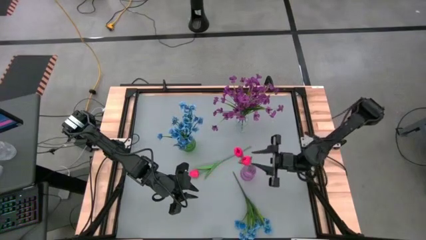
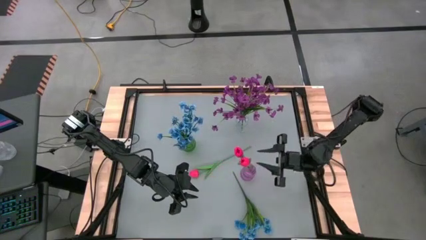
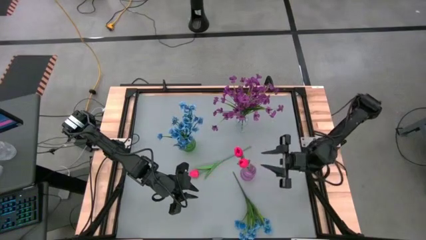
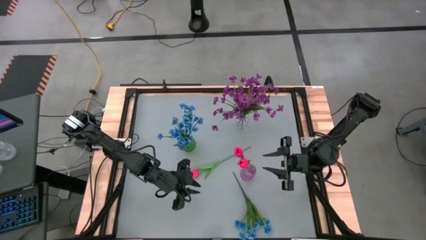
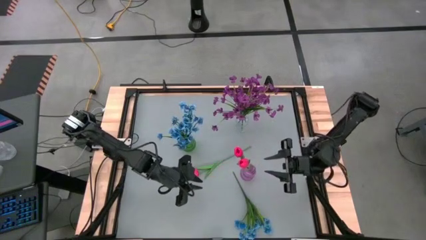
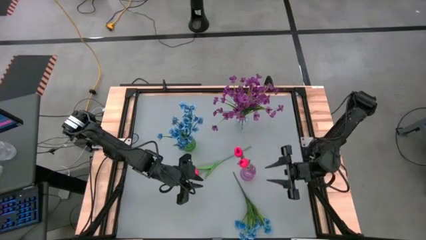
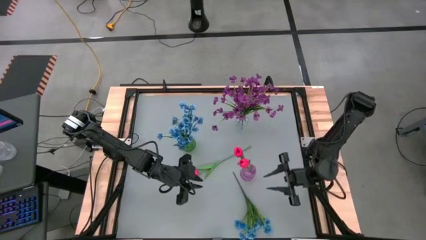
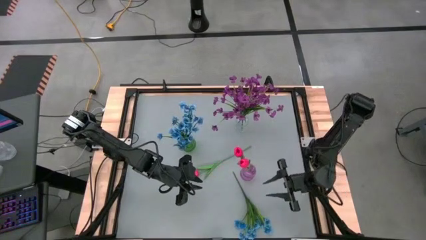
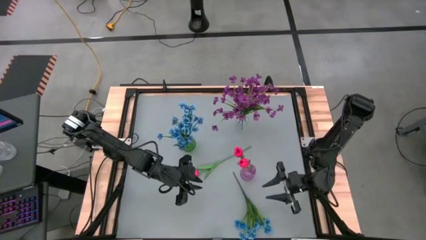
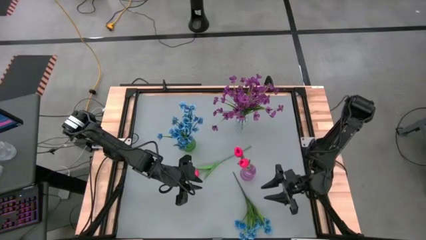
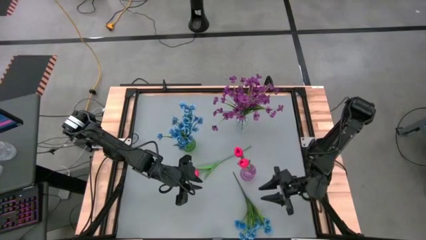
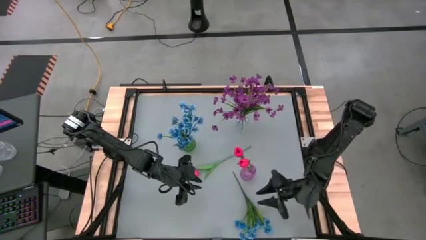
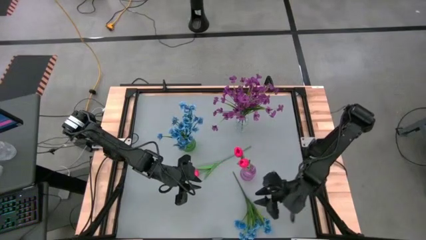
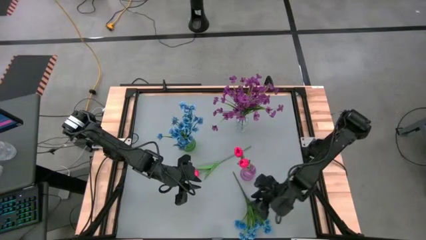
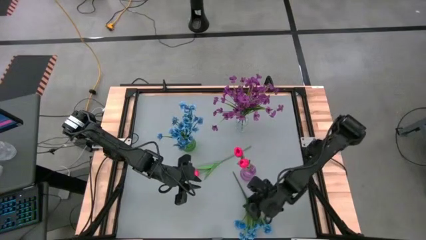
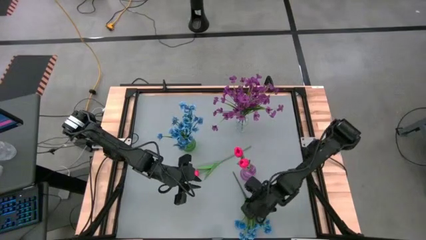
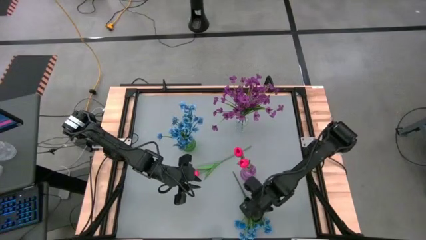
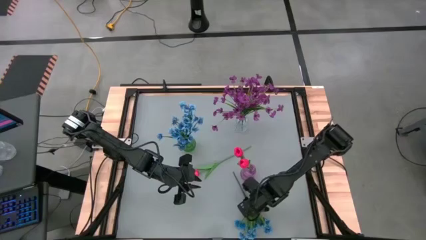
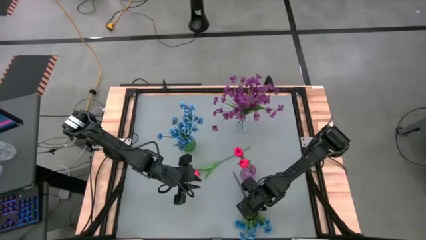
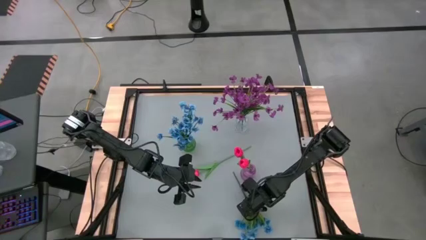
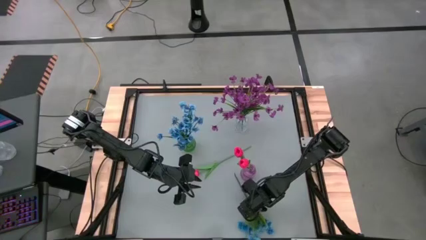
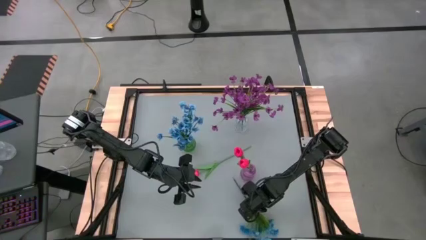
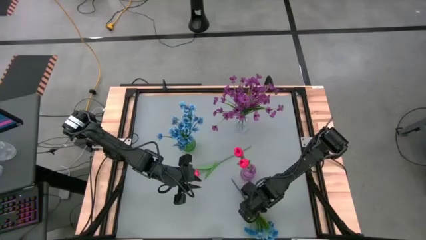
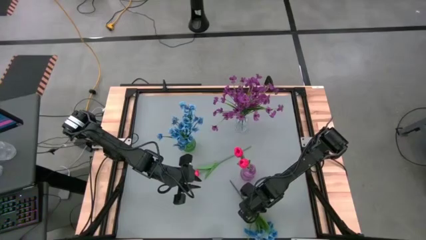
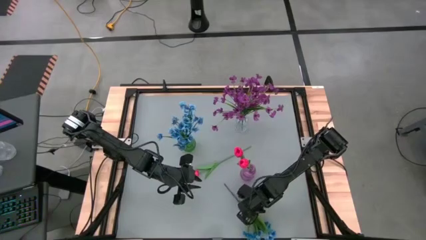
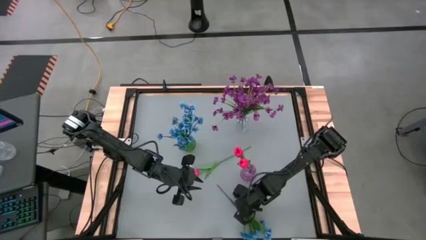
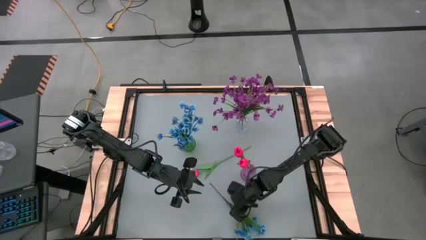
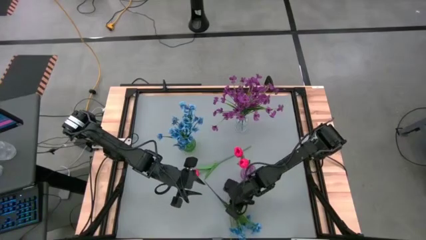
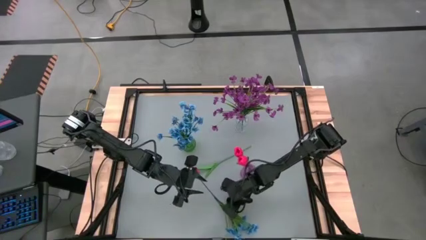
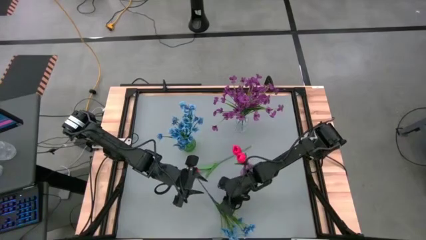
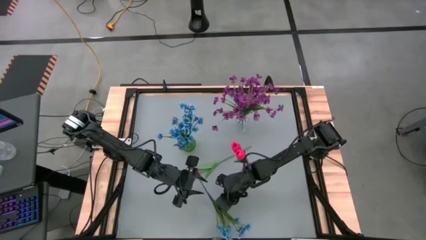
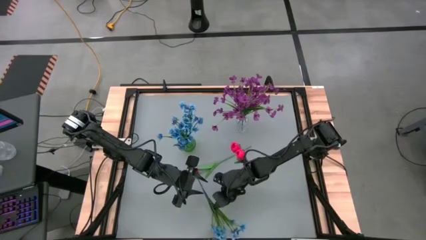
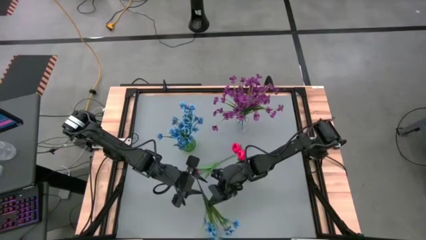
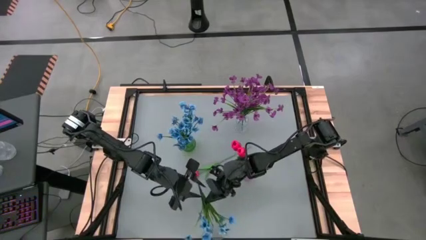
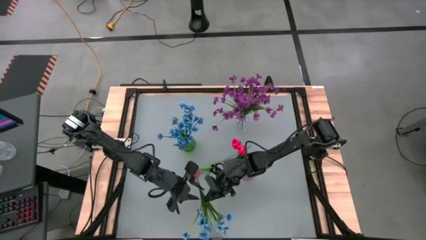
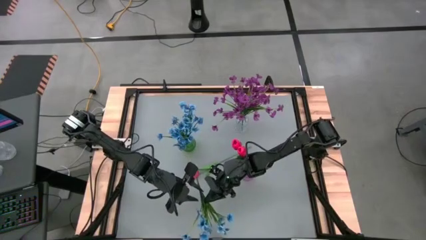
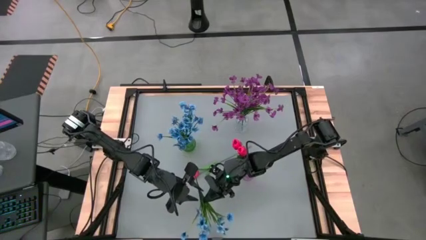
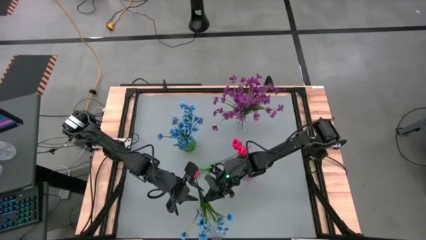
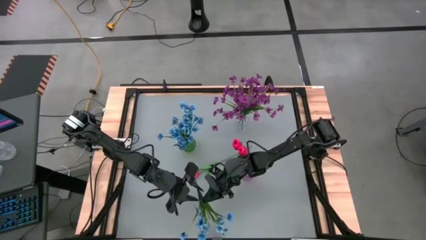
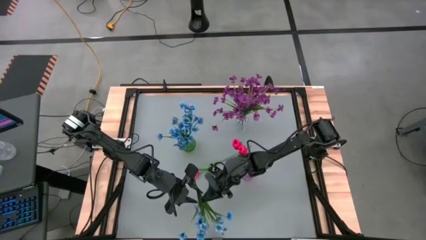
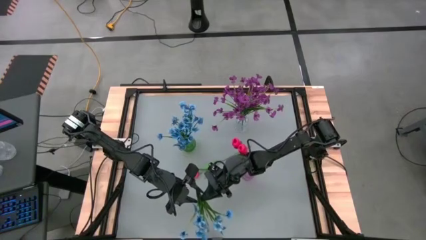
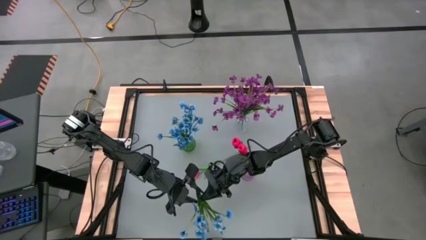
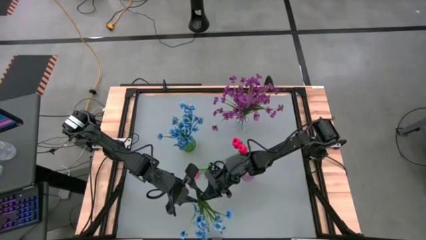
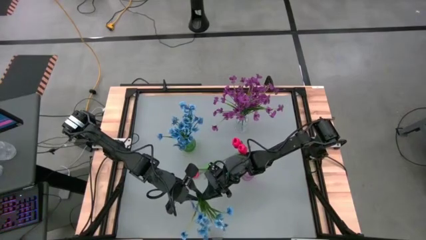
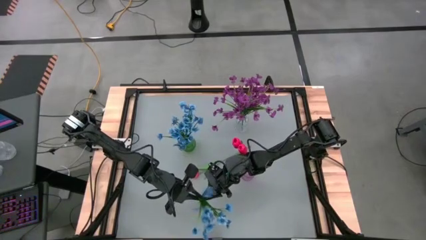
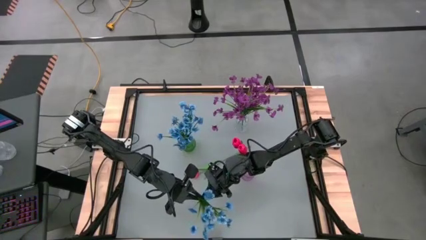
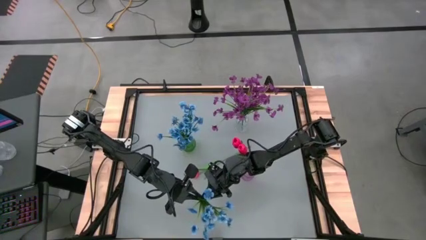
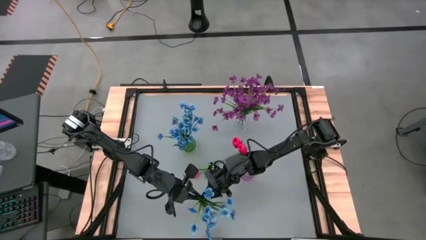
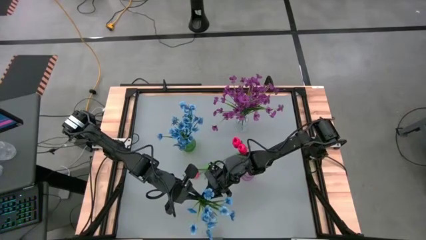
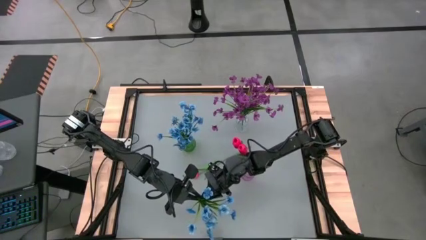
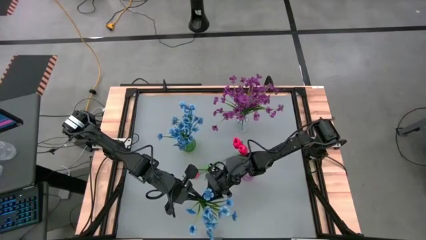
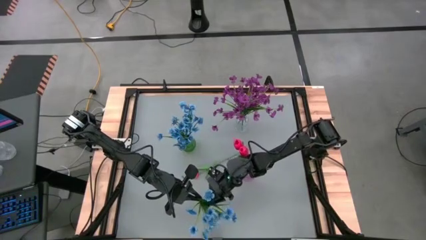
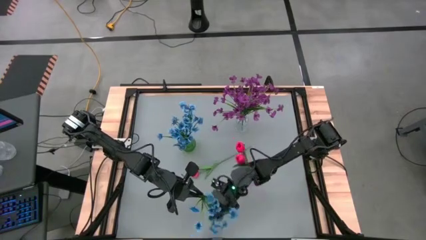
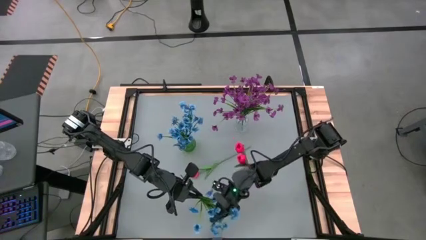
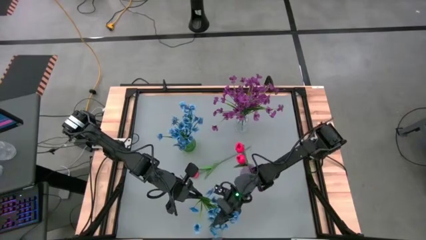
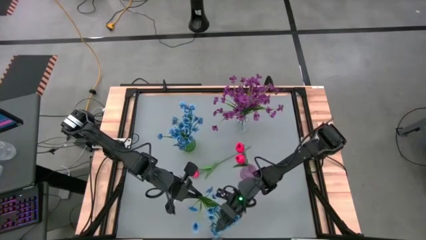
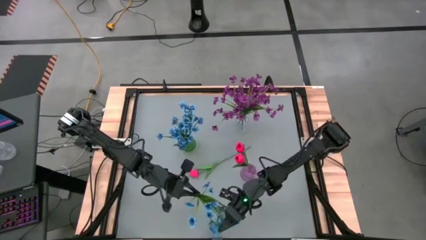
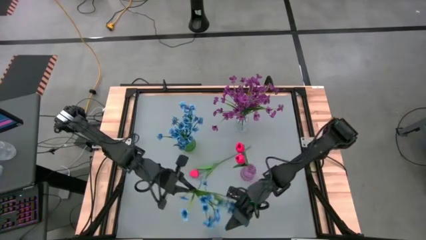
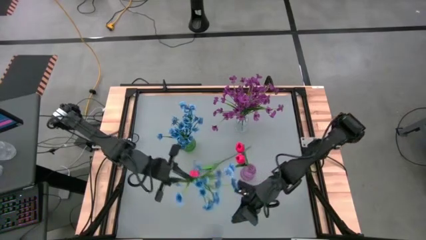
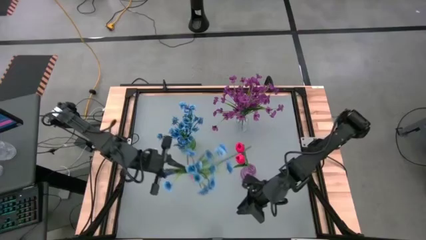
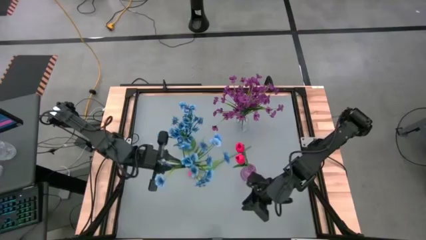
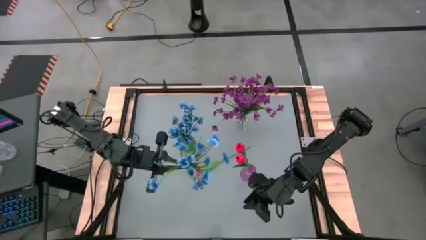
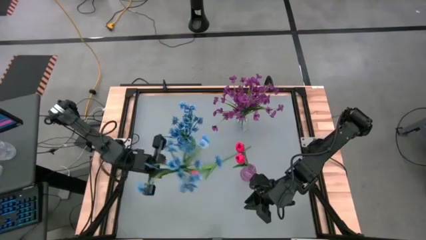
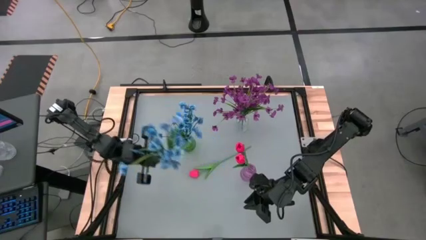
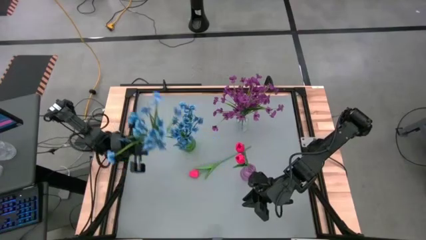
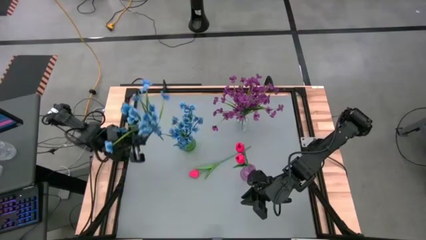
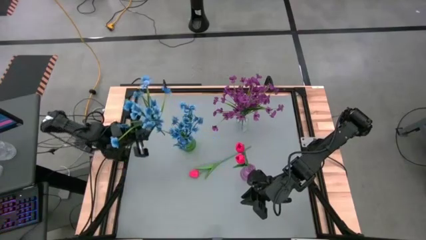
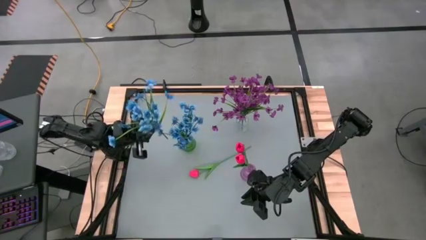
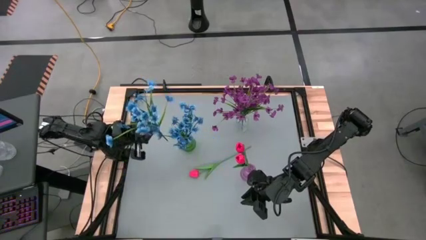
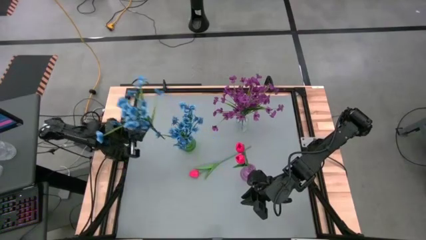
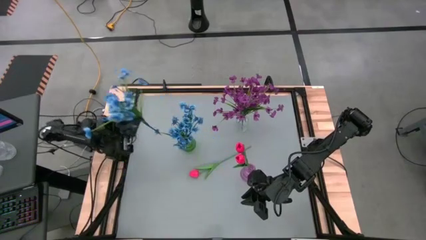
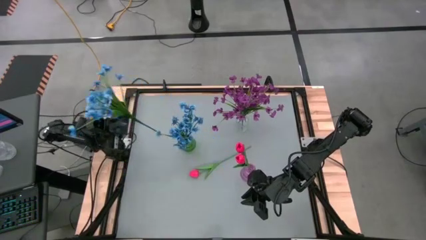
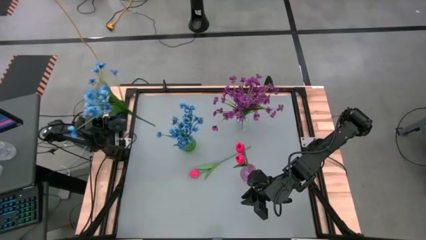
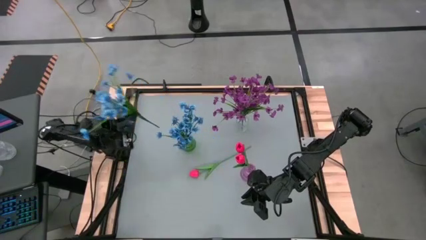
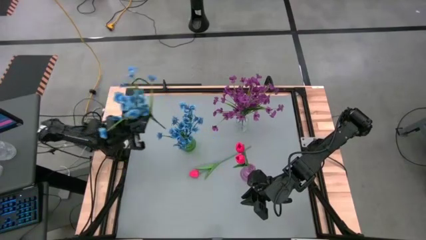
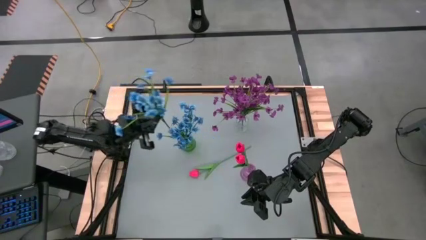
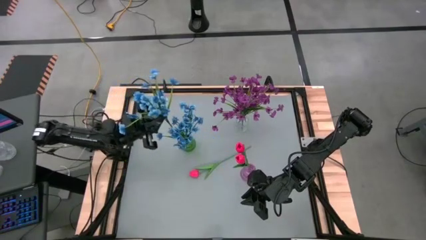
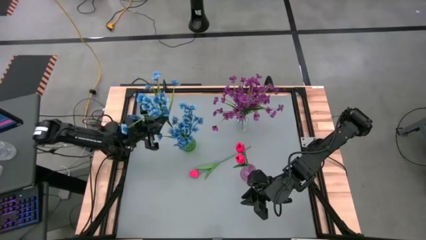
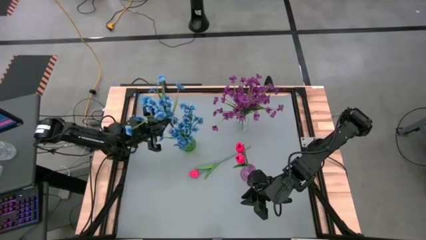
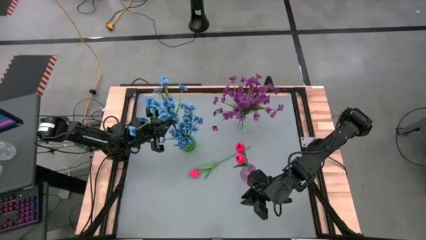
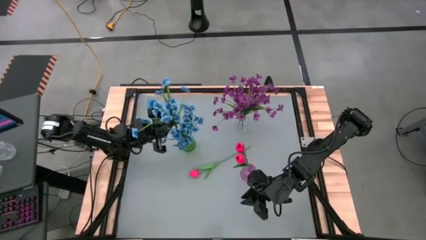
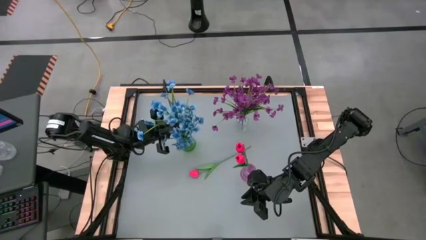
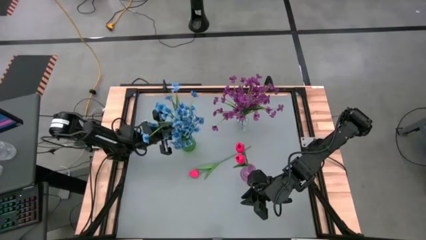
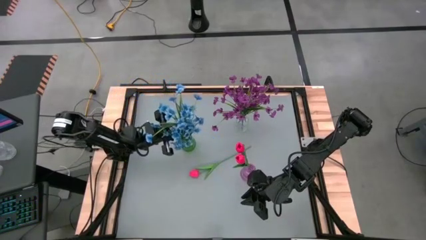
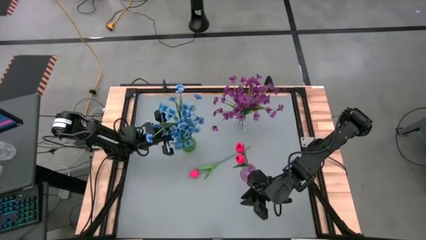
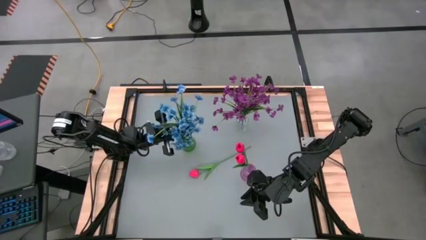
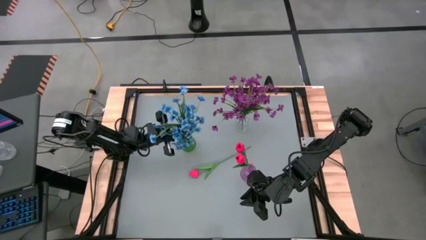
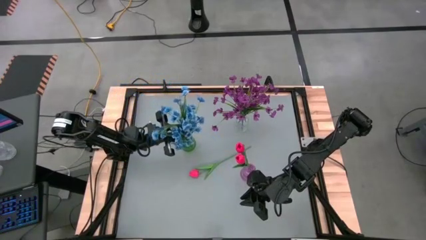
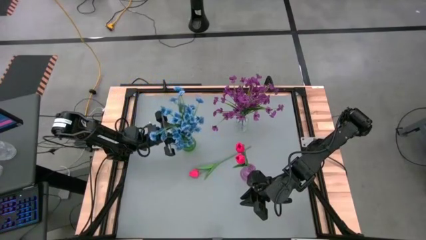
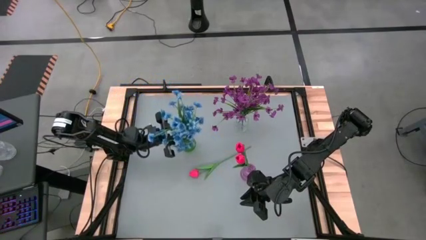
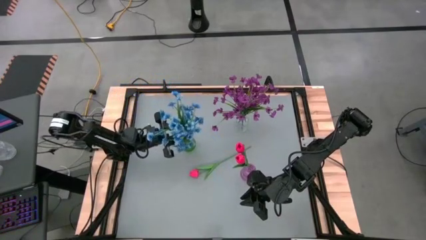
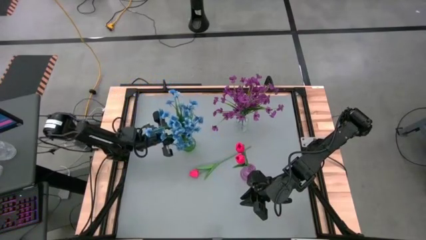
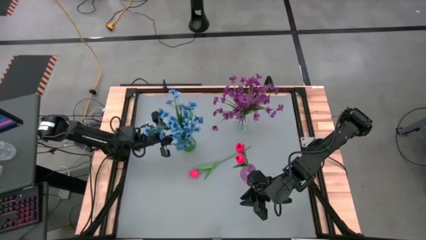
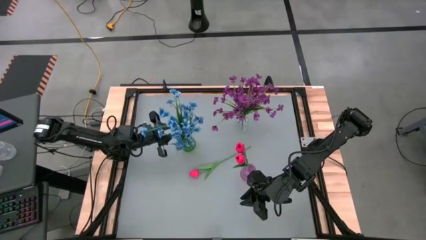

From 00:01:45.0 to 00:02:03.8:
Task: Sort flowers into vase by color
Put the blue flowers into the green flower vase
